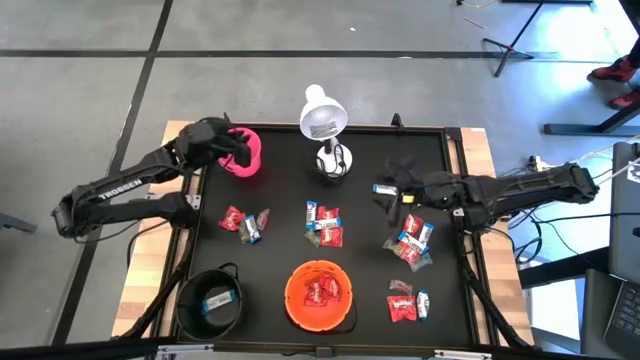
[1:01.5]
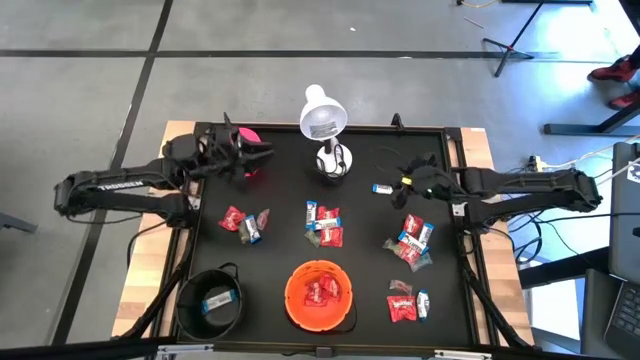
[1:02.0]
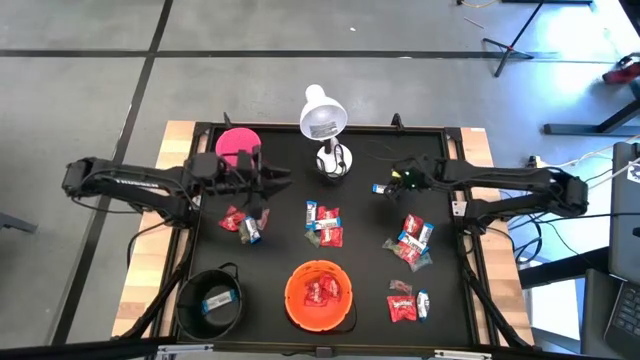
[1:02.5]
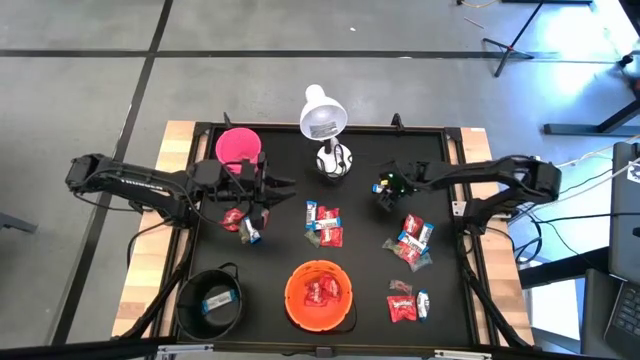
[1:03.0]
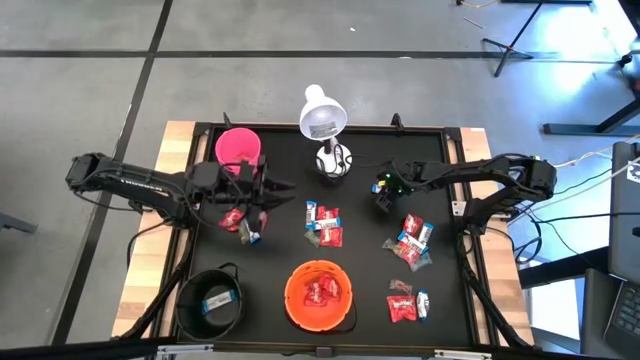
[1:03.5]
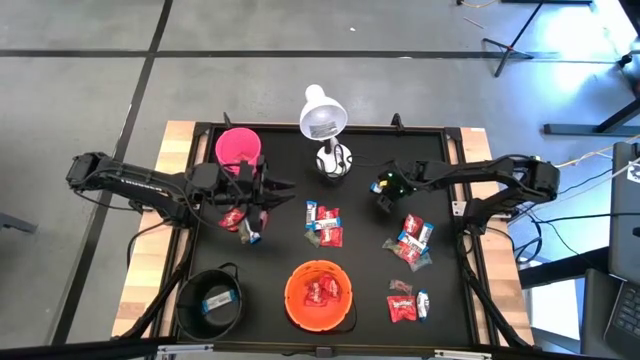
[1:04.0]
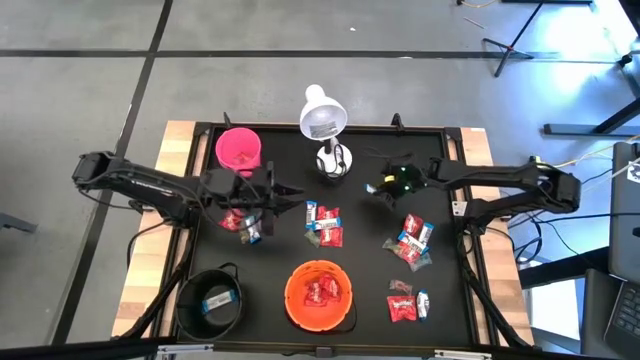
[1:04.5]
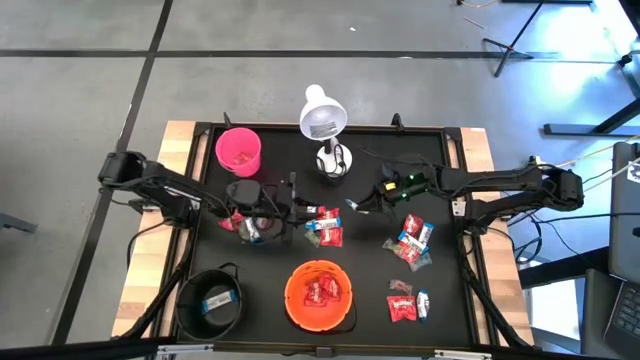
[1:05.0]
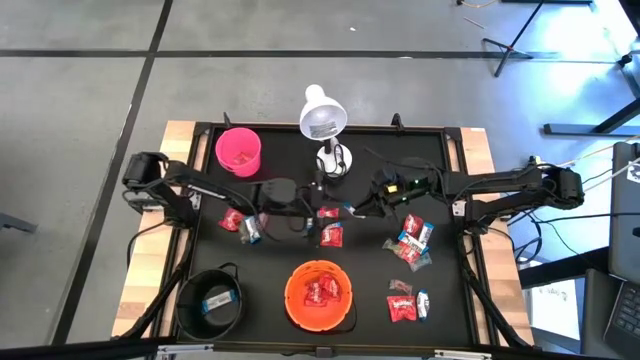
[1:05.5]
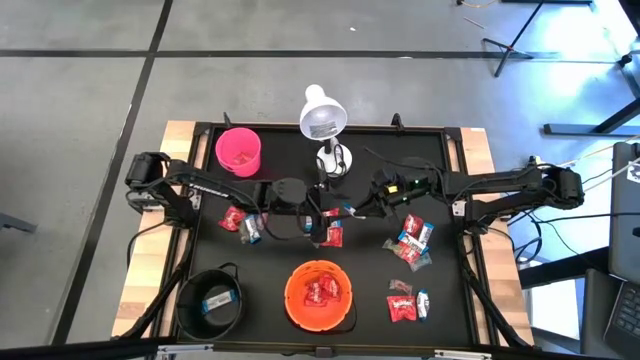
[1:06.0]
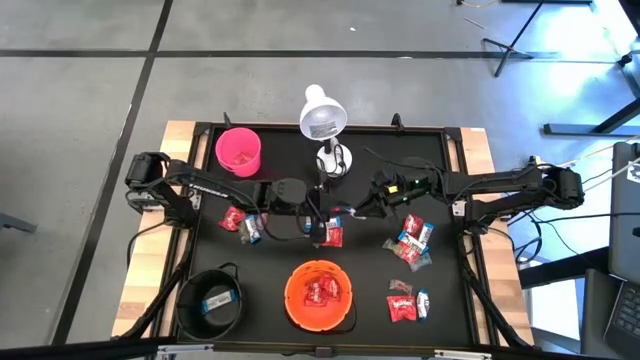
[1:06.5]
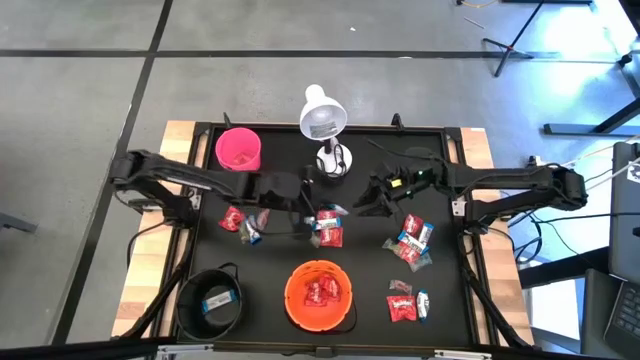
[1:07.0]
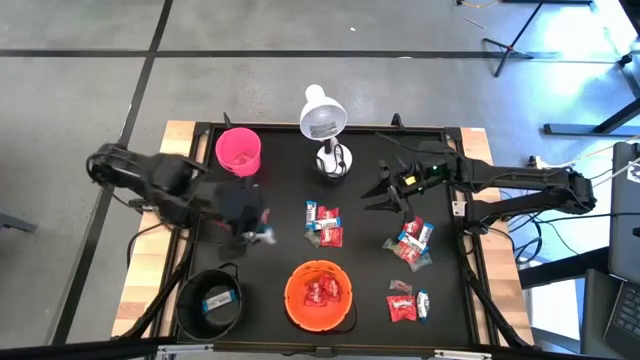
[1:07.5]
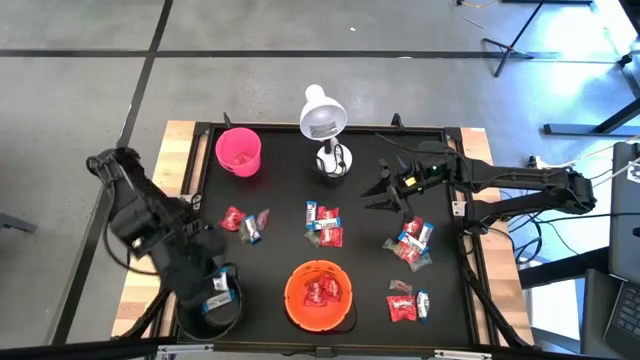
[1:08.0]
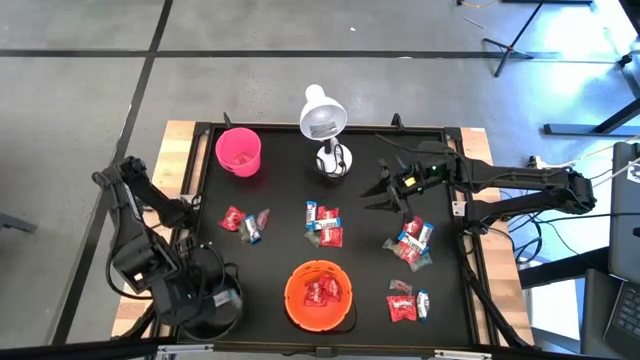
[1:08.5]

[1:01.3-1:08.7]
Task: Sort candy
Put the white candy into the black bucket

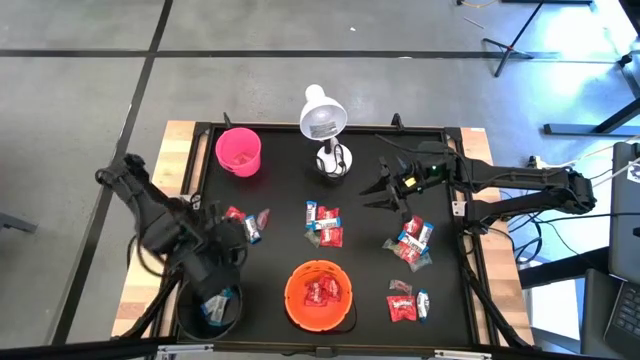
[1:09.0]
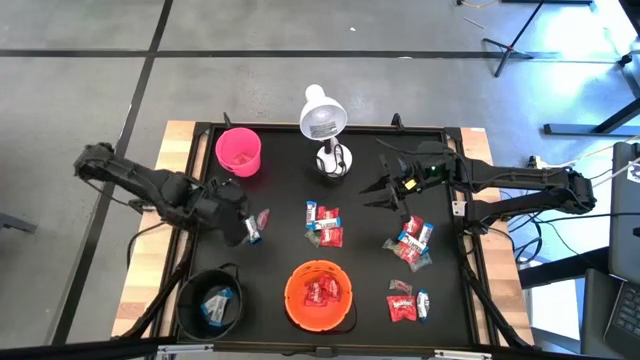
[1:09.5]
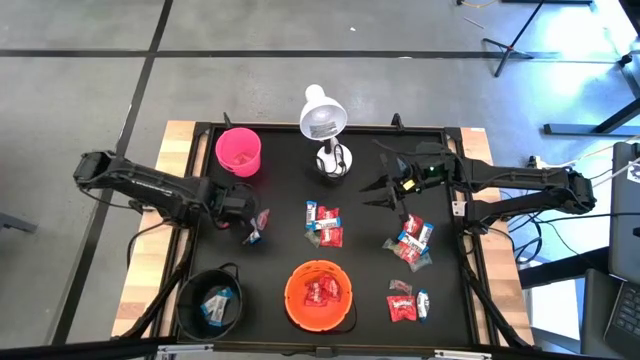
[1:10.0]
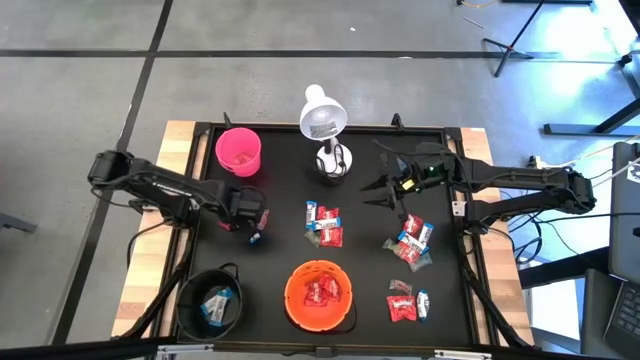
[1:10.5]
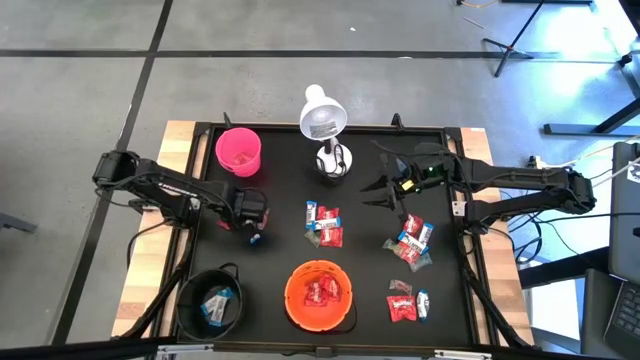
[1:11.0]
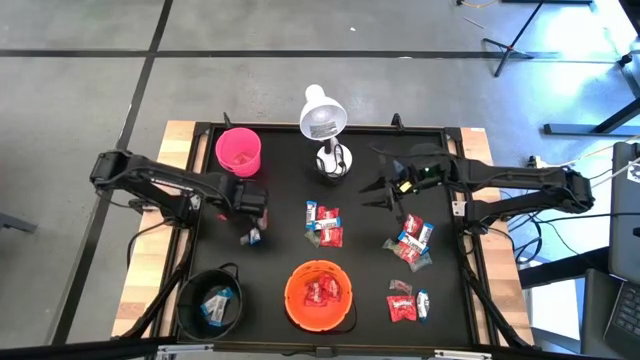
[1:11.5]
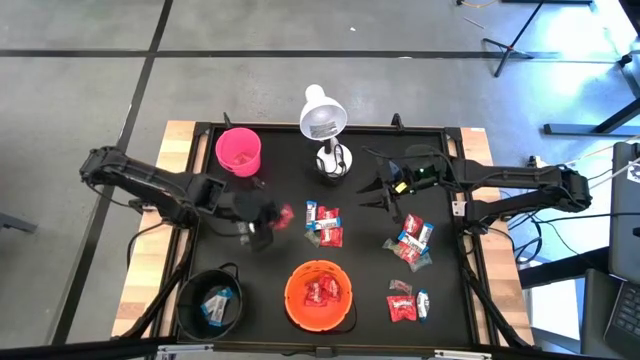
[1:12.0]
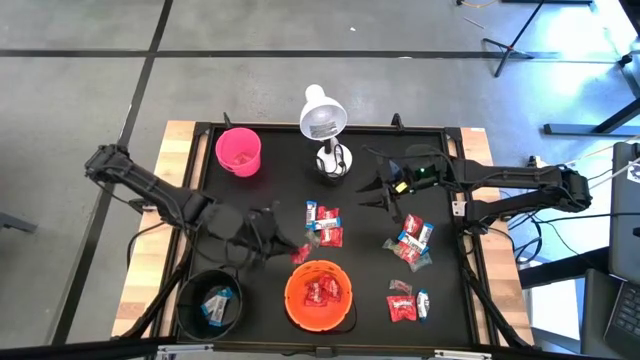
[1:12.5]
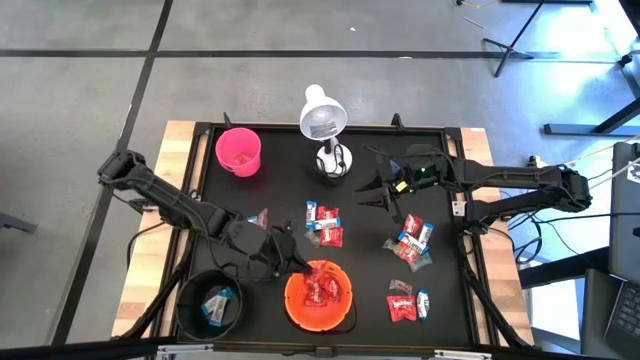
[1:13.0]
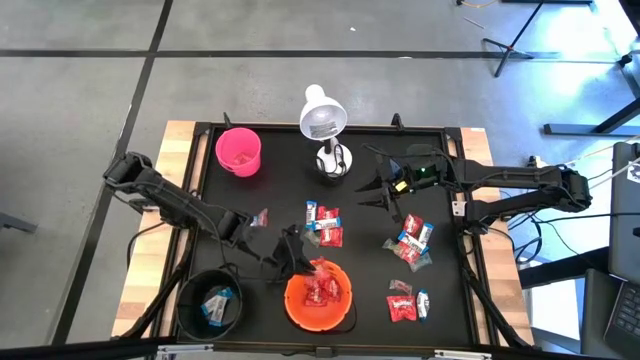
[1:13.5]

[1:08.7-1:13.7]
Put the red candy into the orange bucket

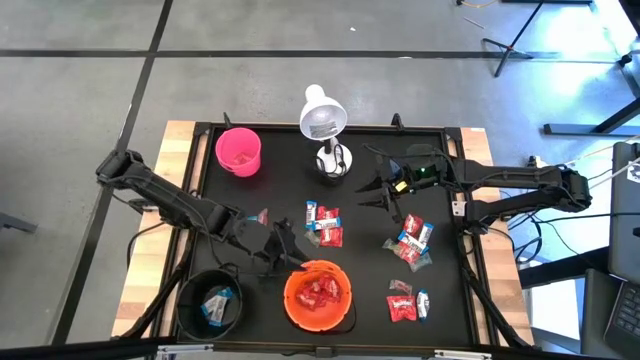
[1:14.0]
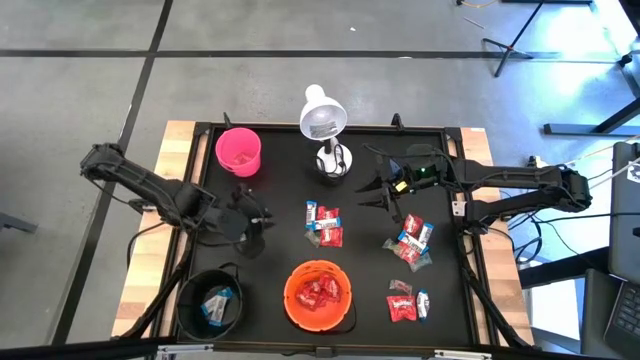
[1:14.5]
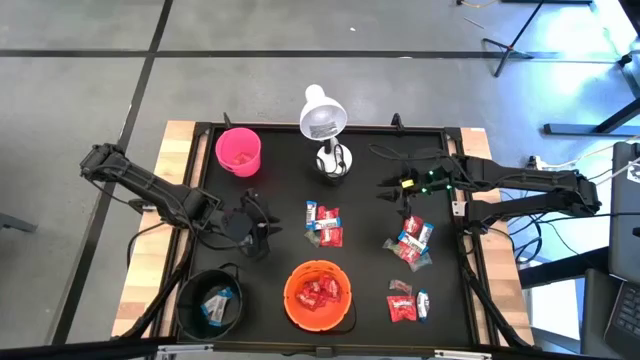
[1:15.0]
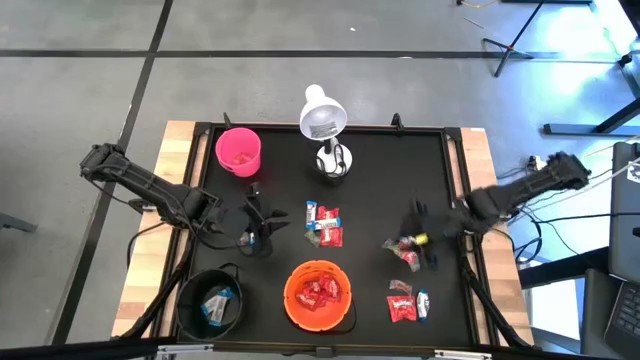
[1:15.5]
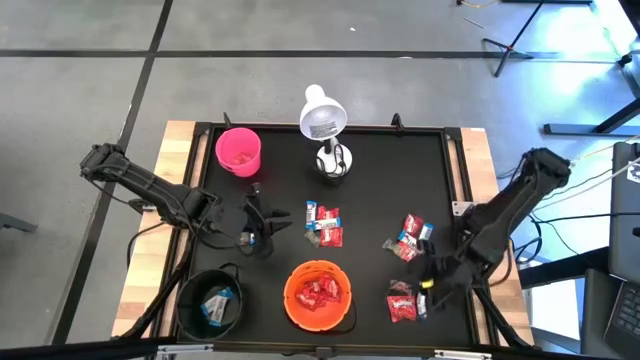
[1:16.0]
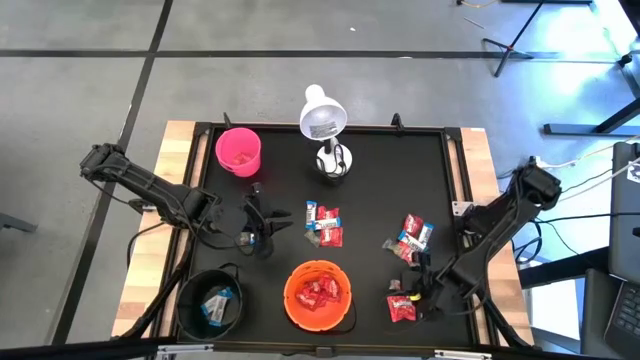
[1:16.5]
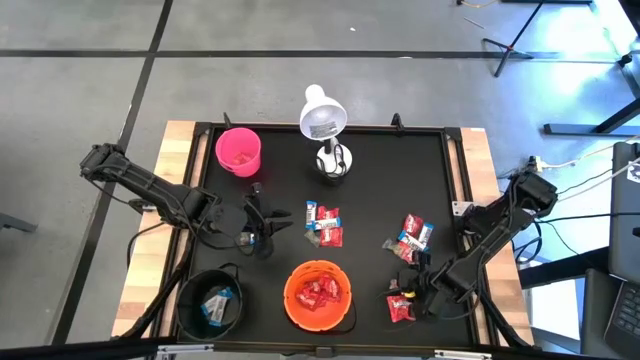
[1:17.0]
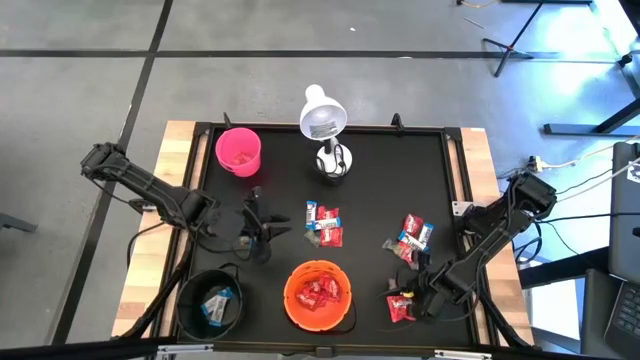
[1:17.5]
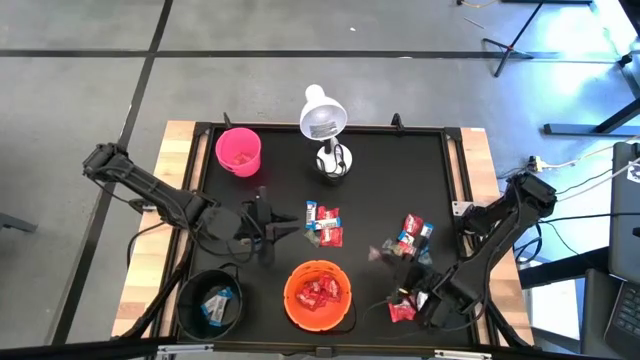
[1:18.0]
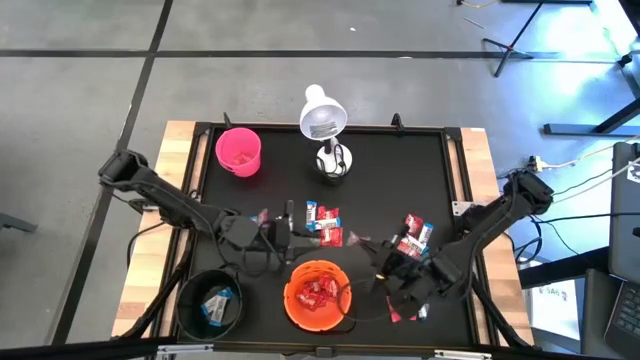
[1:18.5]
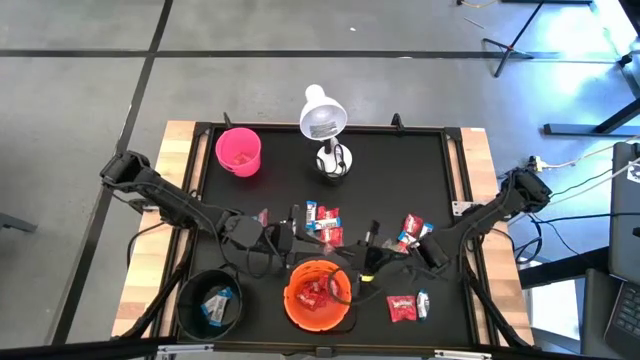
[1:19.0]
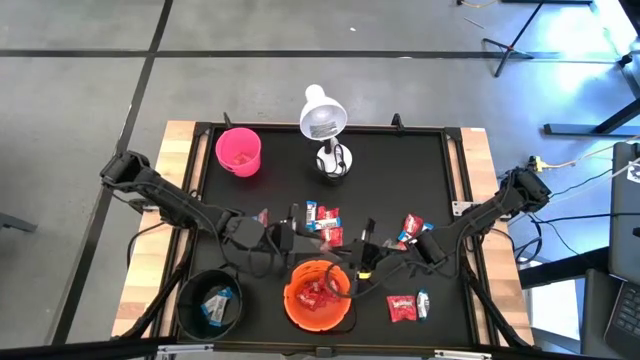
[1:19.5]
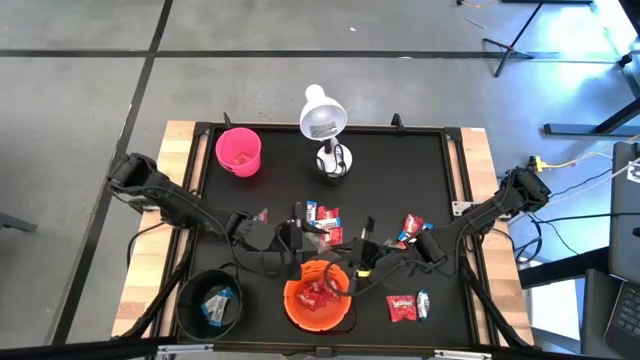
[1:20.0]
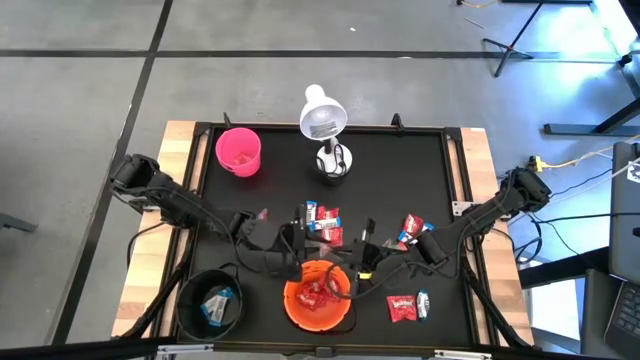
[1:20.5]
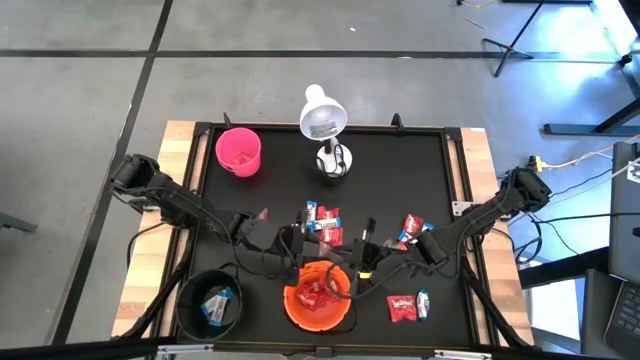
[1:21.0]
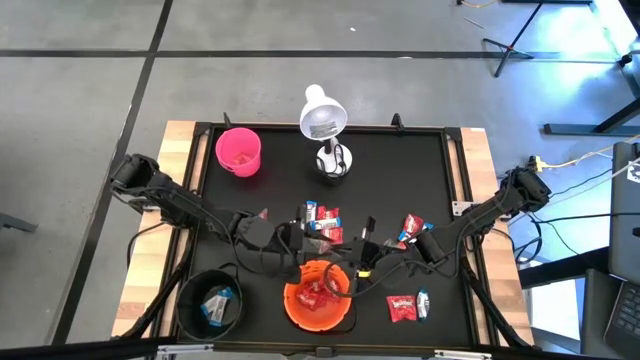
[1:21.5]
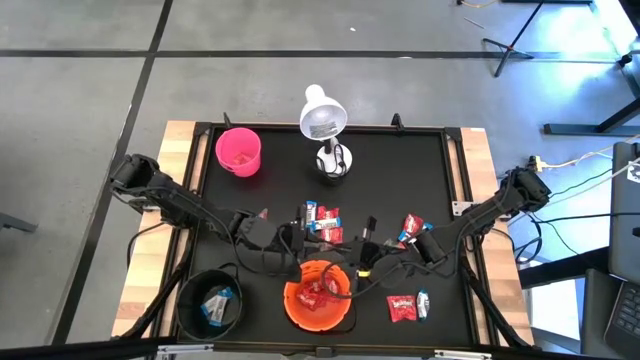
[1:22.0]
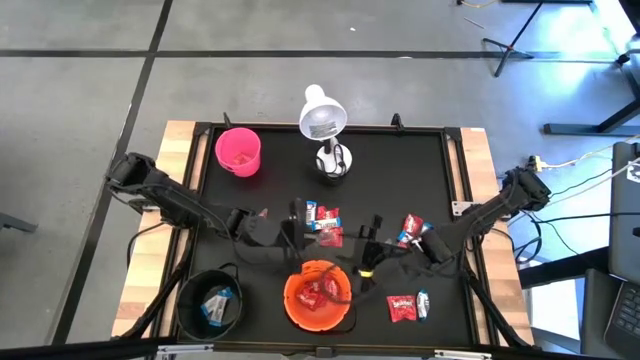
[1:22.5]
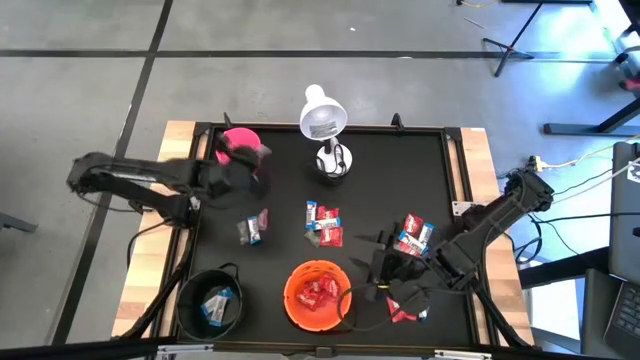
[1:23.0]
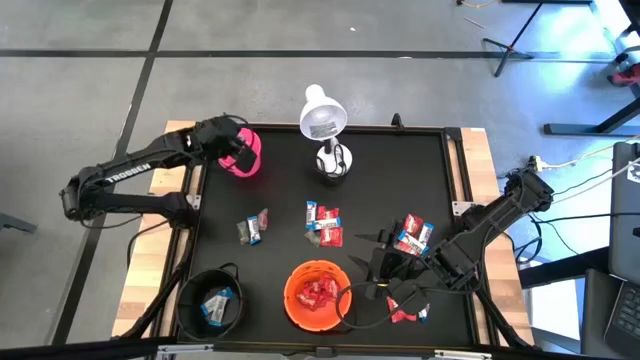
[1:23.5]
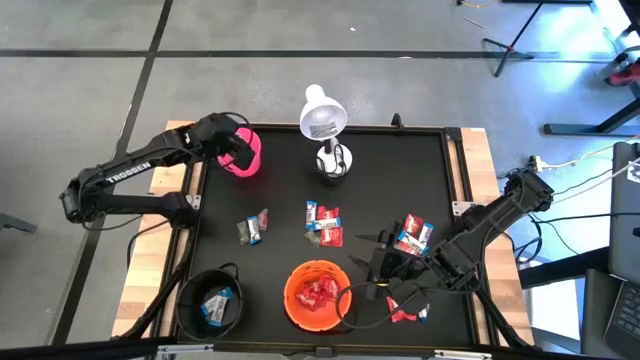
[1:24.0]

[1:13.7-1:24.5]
Put the orange candy into the pink bucket
